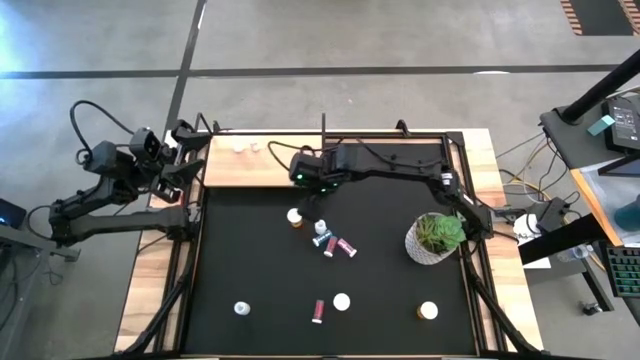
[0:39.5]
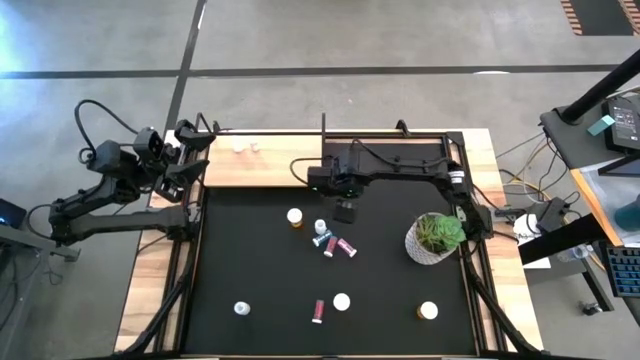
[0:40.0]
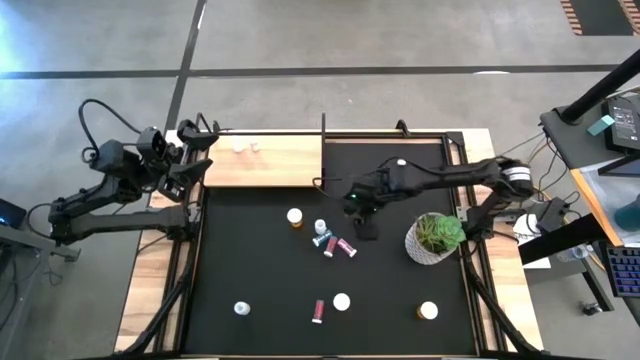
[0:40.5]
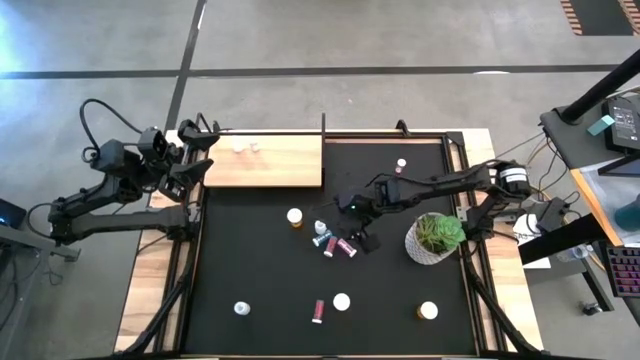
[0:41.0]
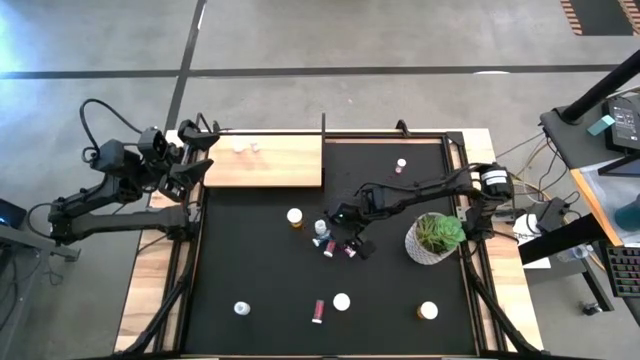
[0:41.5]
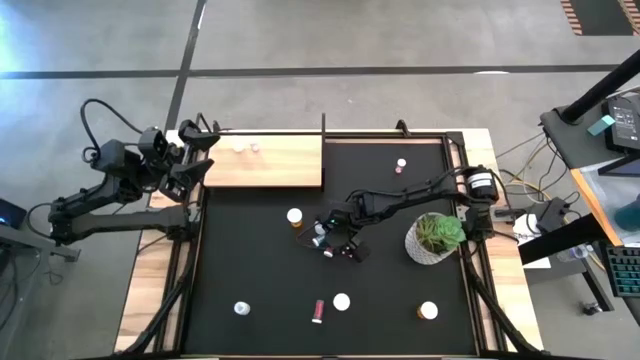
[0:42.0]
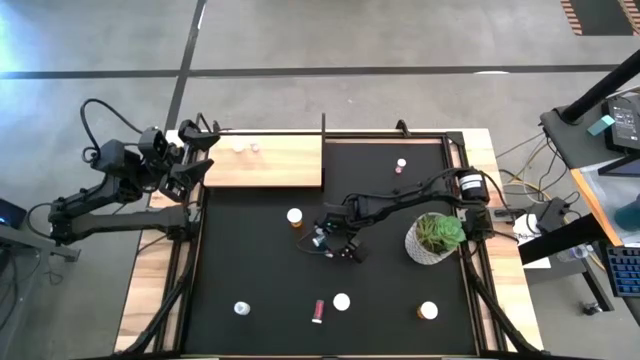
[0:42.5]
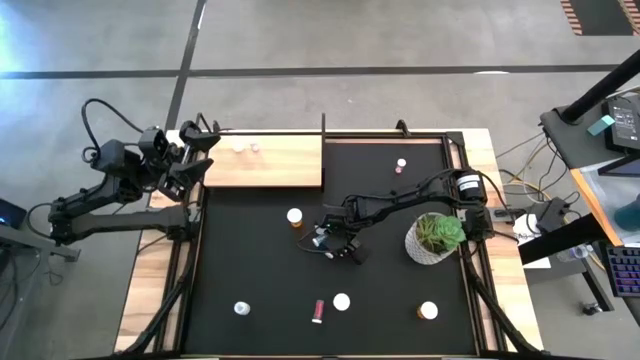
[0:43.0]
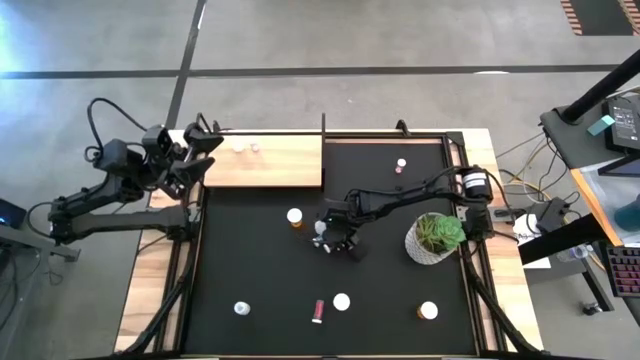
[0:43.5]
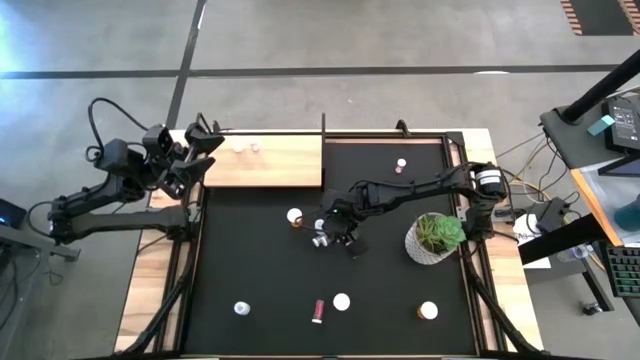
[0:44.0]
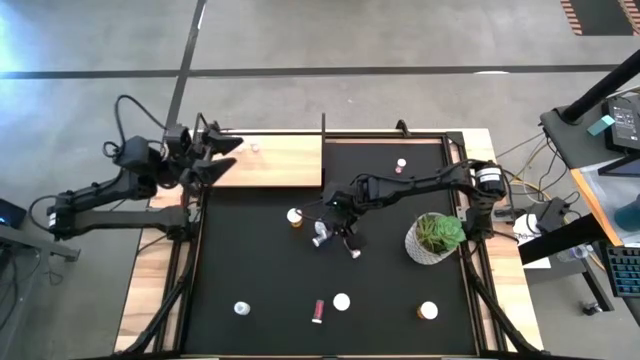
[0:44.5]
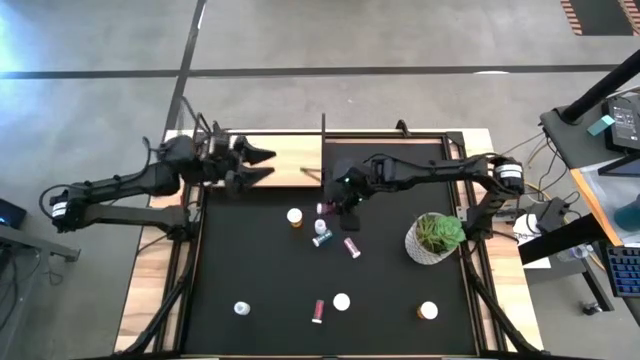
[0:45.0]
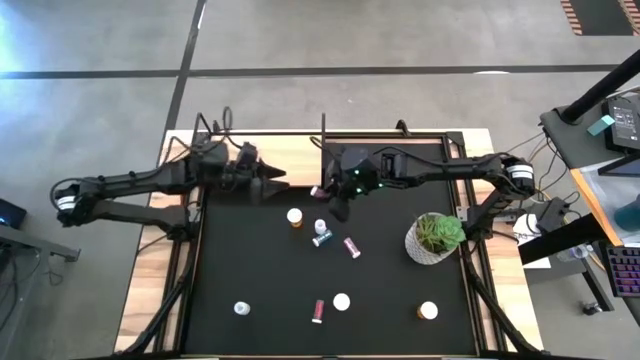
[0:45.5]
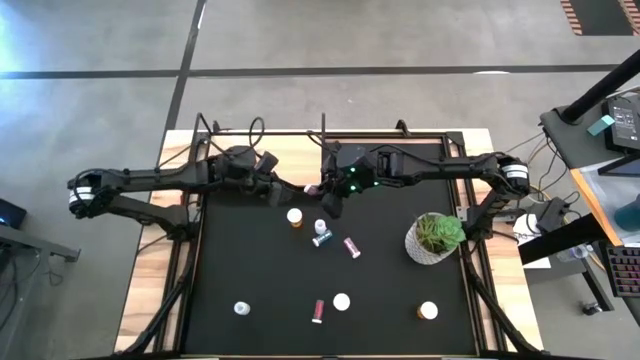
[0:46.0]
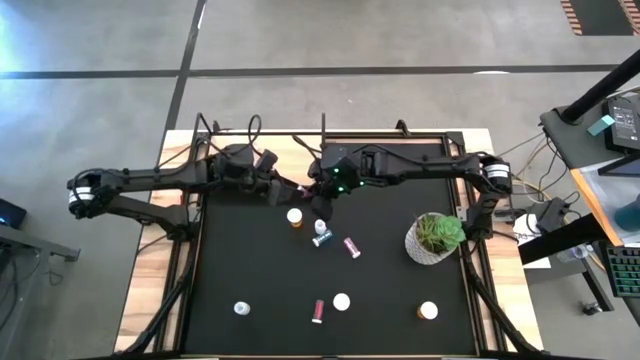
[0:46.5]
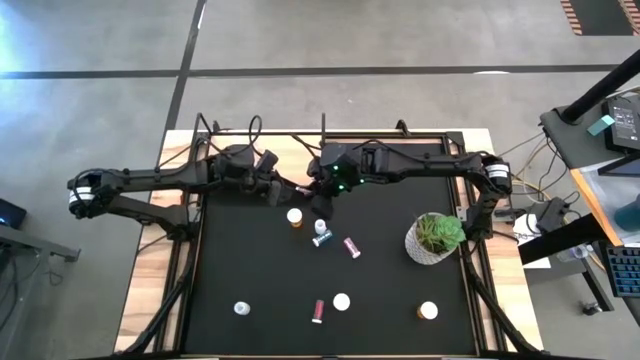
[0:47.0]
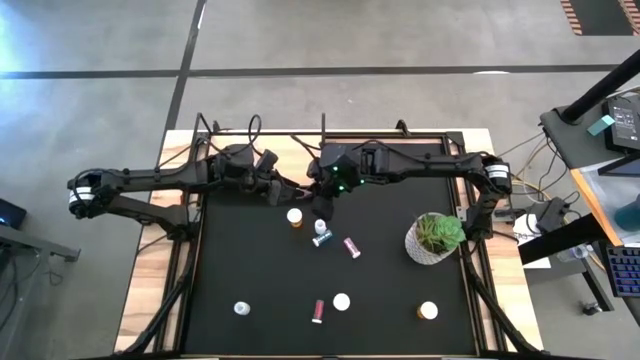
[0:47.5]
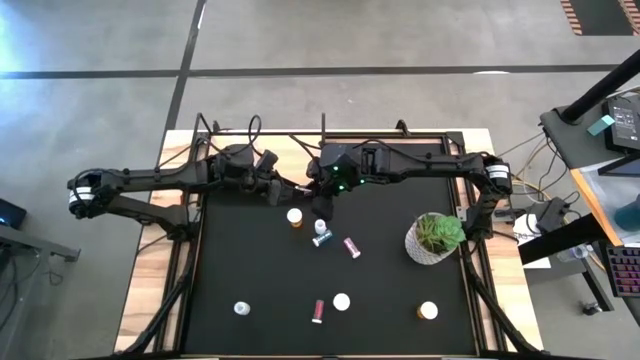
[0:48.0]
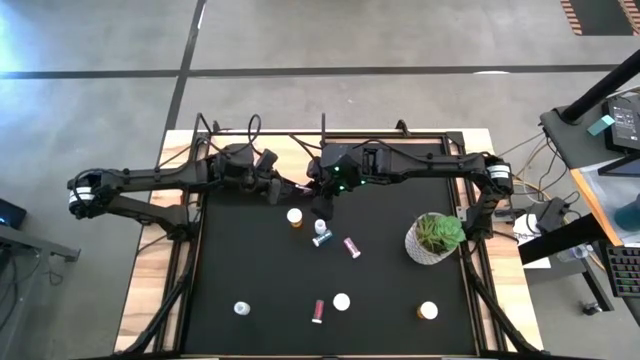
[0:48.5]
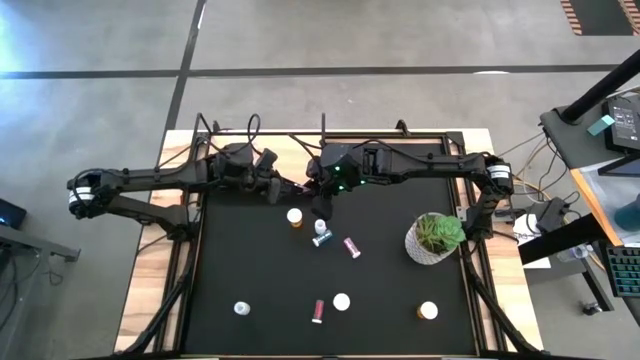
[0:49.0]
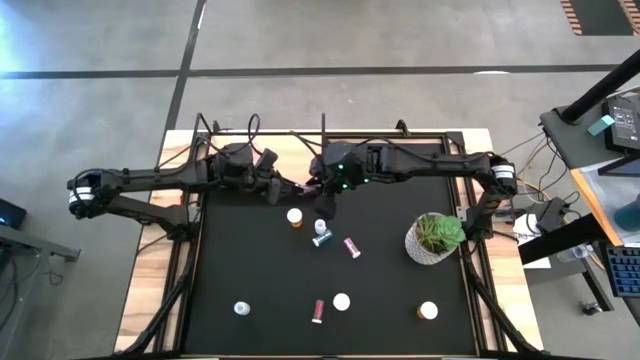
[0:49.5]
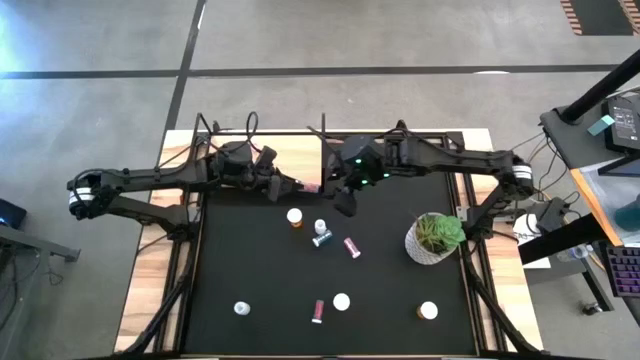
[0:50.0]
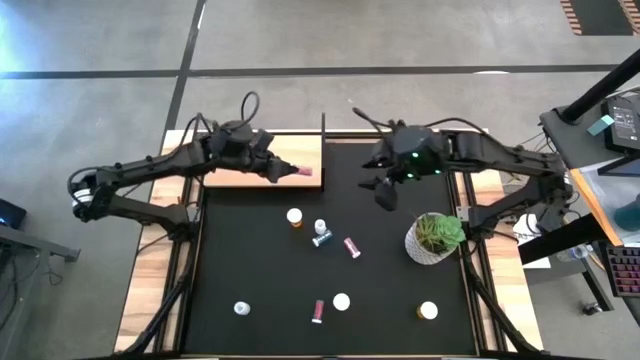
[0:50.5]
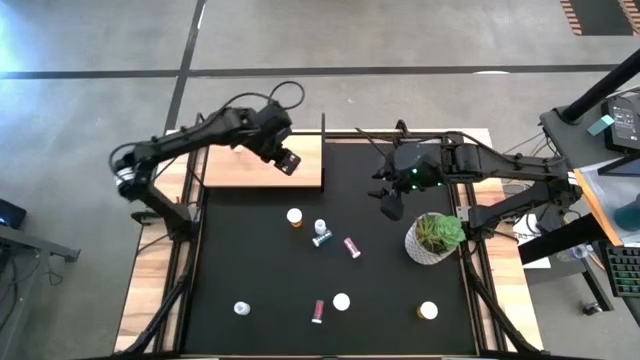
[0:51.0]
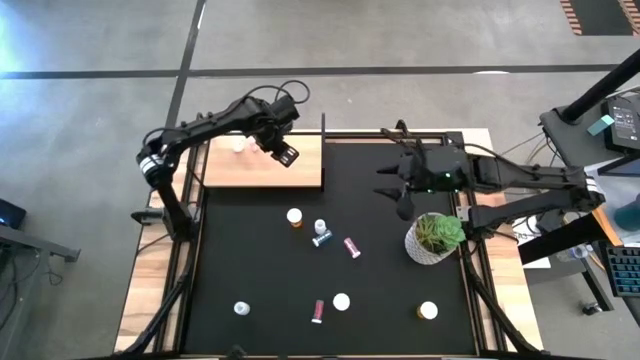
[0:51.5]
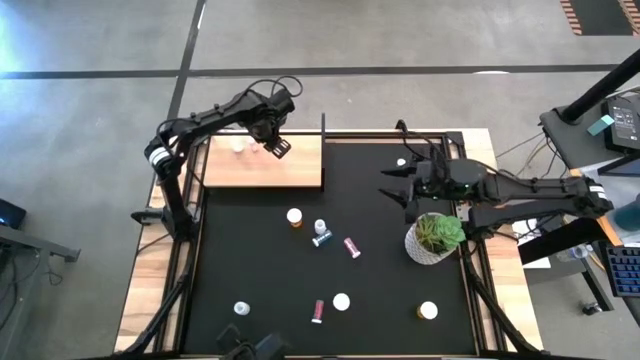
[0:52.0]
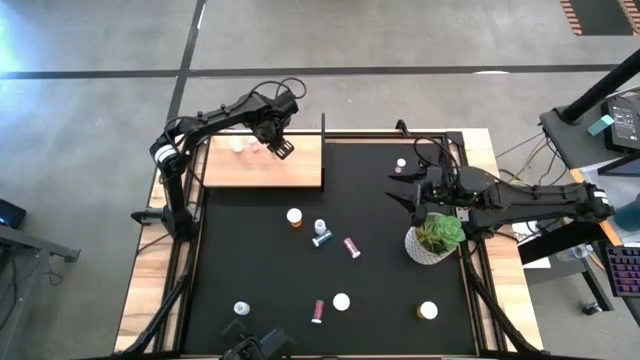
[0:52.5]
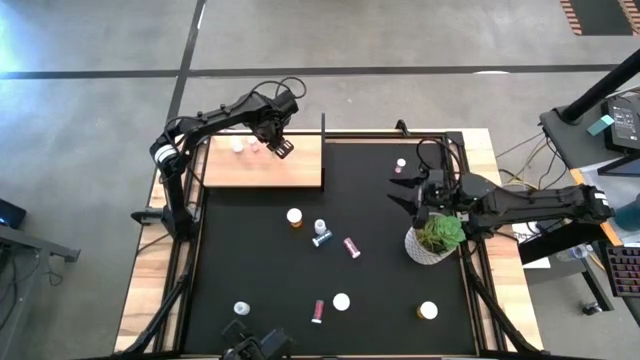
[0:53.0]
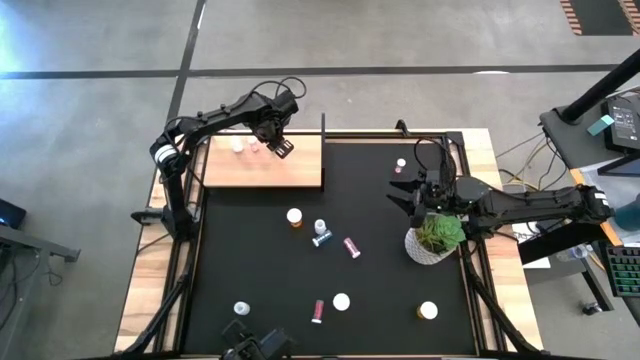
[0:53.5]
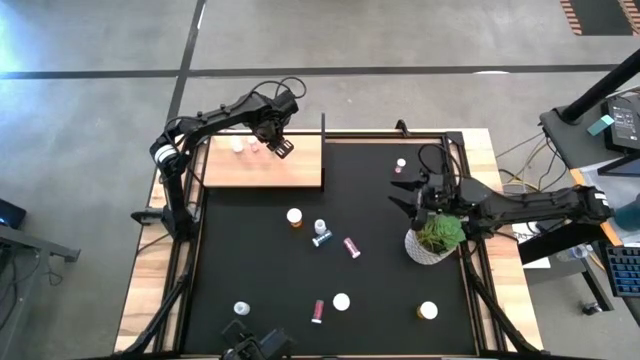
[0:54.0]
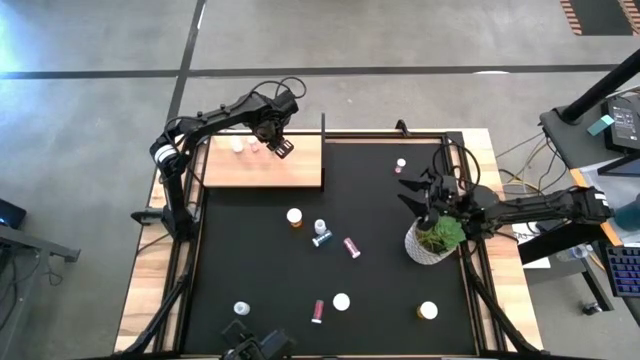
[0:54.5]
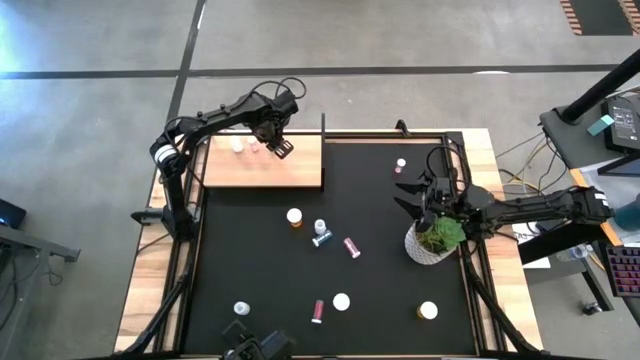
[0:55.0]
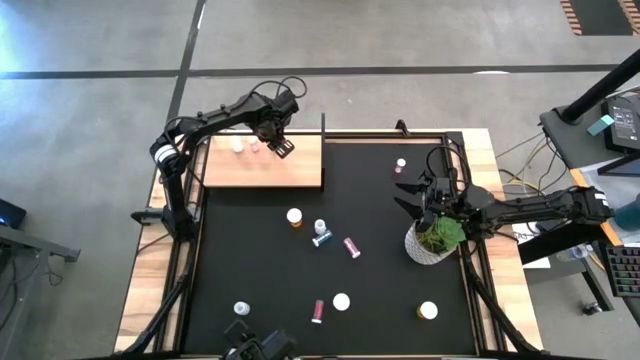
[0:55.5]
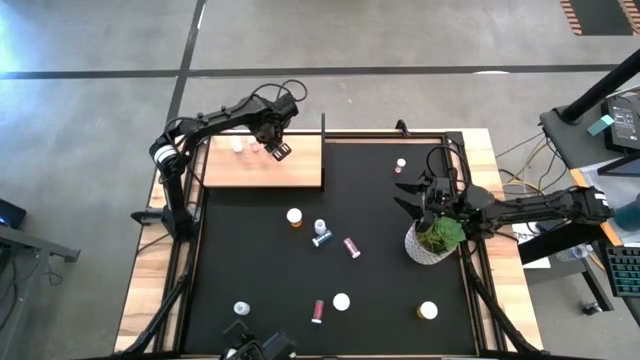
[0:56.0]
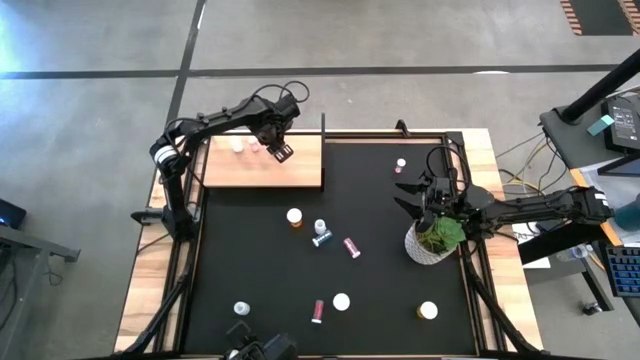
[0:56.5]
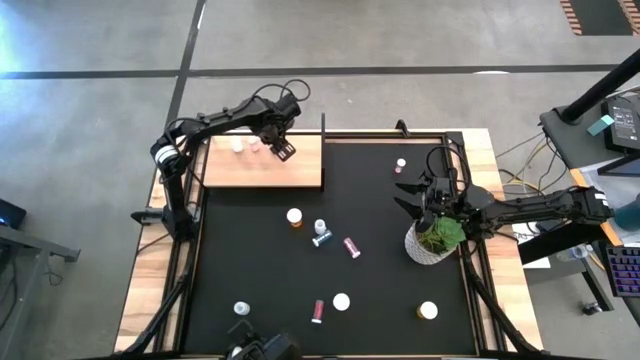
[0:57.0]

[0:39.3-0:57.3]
Task: Pick and place medicine bottles onto shelf by color
Put the top left blue pill bottle into the shelf

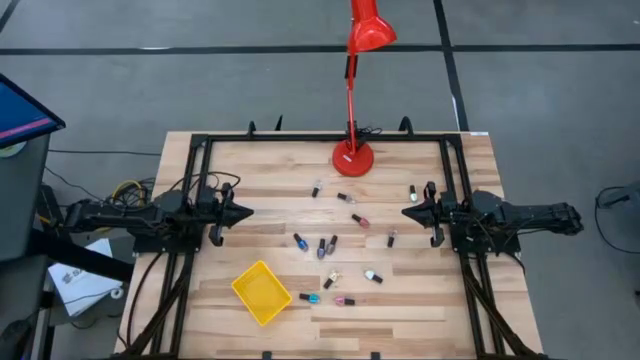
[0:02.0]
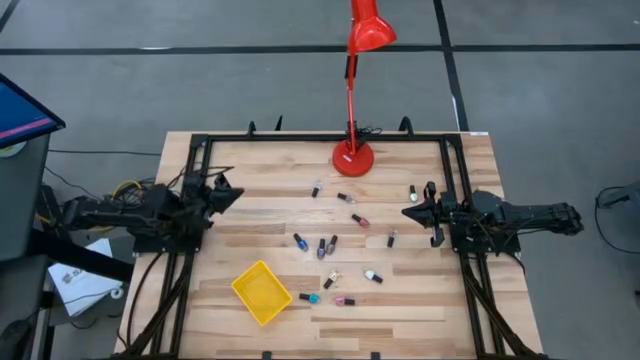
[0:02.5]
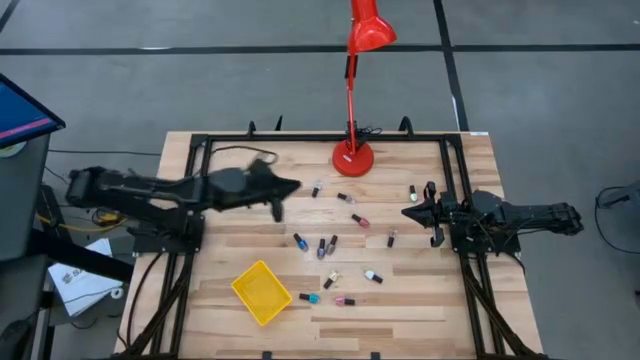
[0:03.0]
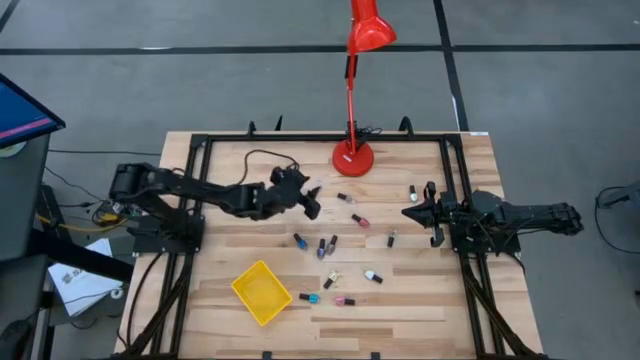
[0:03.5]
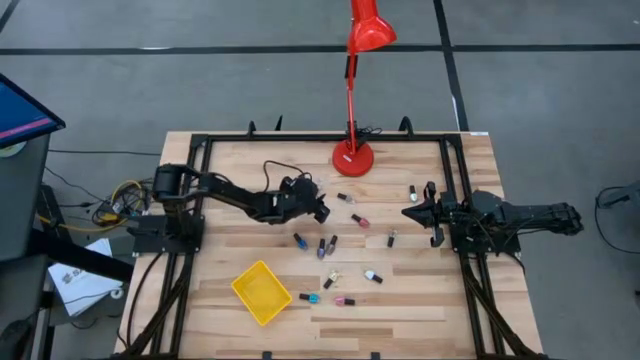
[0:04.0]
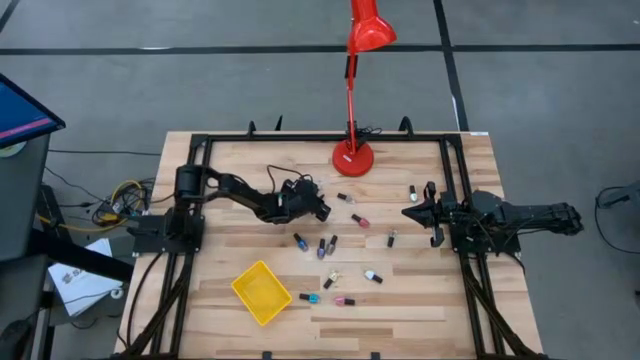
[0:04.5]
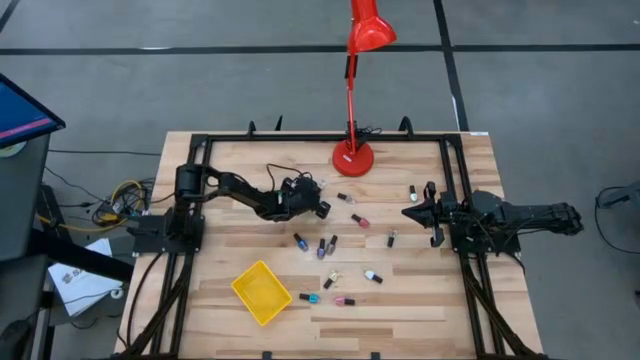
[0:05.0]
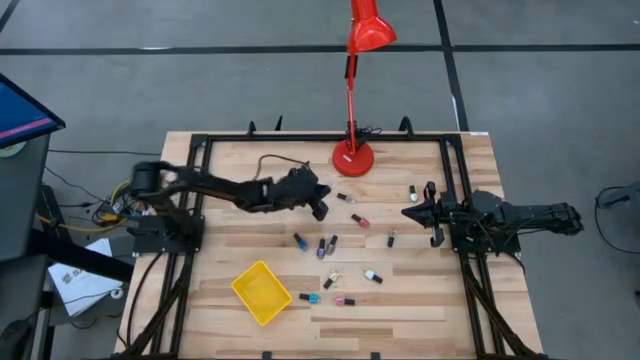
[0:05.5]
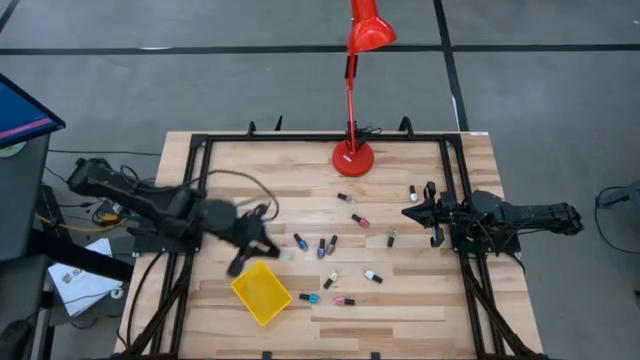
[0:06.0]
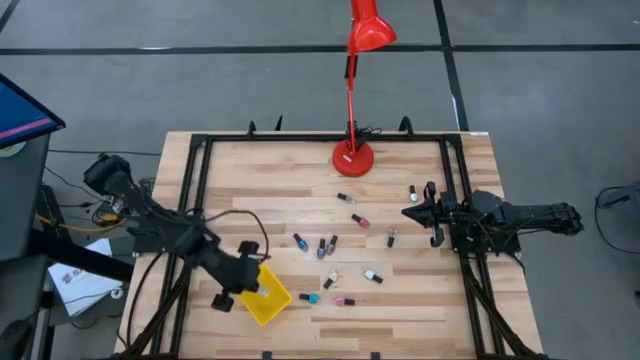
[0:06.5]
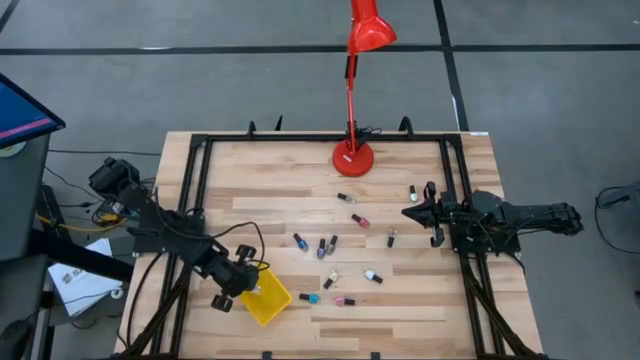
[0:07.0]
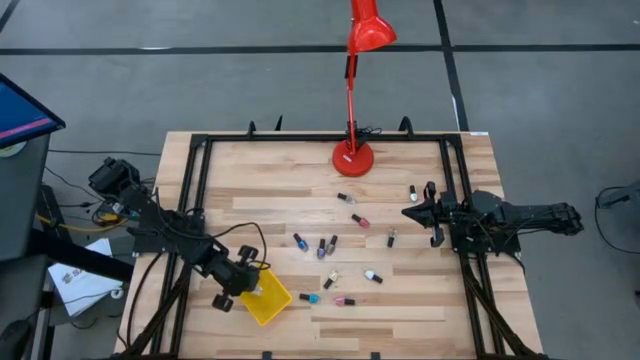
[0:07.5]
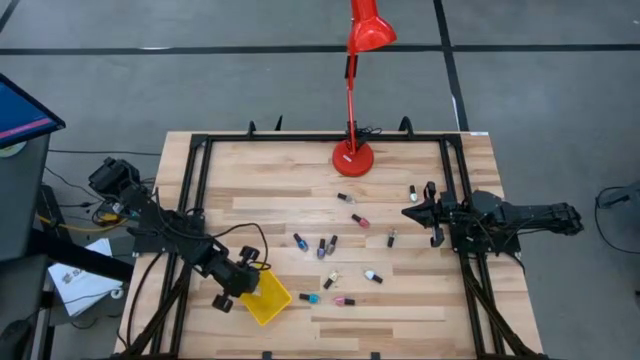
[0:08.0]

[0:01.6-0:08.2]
Task: Pick & Place Nail Polish
Put the top white nail polish bottle into the yellow basket
